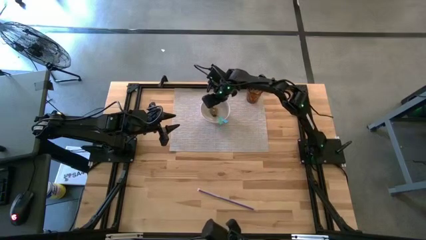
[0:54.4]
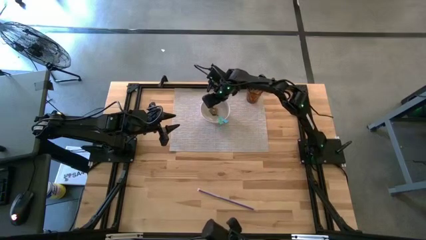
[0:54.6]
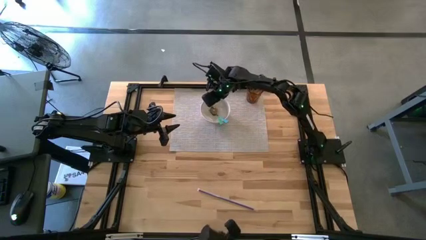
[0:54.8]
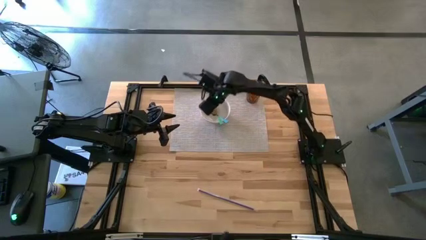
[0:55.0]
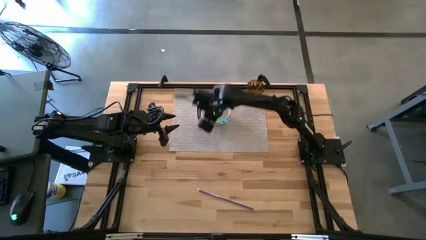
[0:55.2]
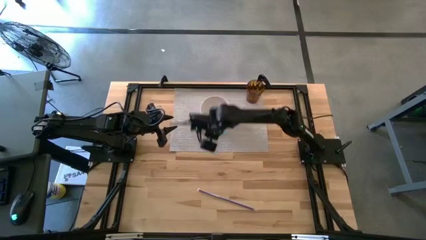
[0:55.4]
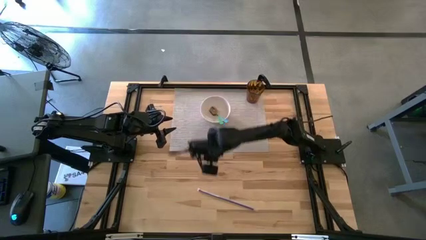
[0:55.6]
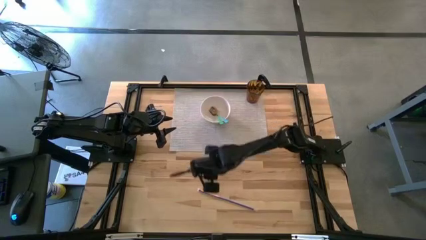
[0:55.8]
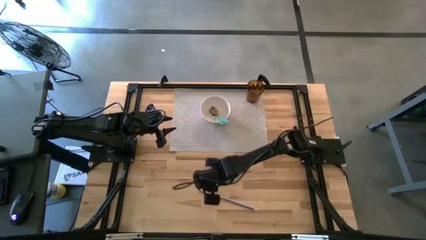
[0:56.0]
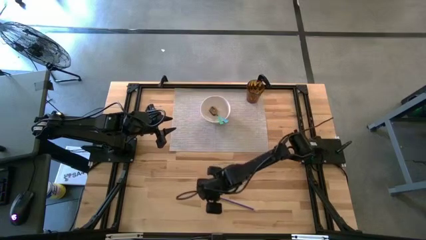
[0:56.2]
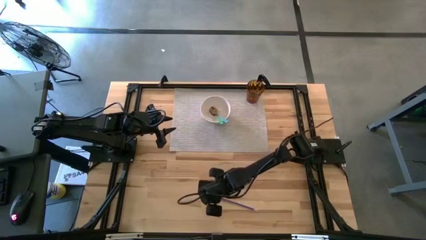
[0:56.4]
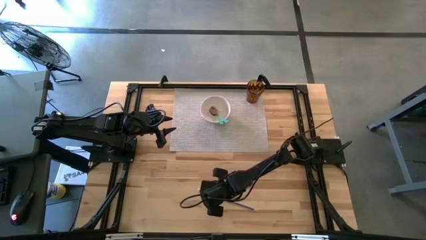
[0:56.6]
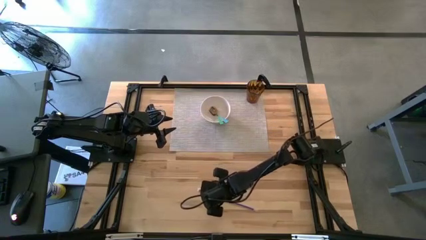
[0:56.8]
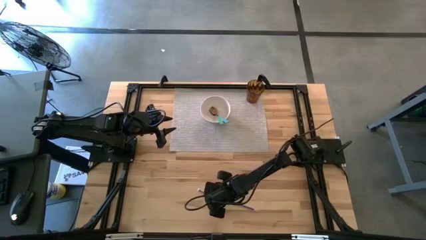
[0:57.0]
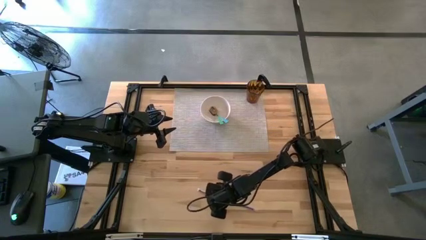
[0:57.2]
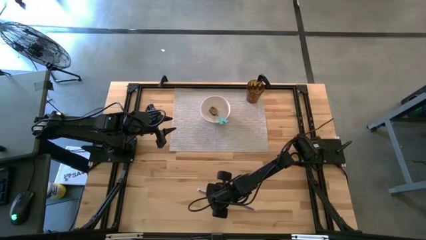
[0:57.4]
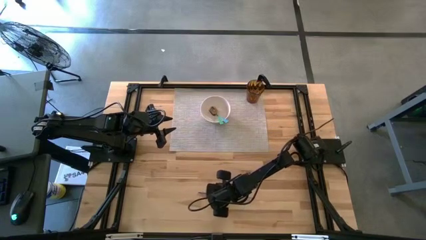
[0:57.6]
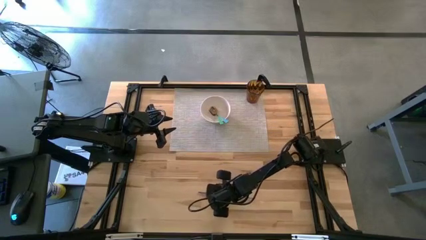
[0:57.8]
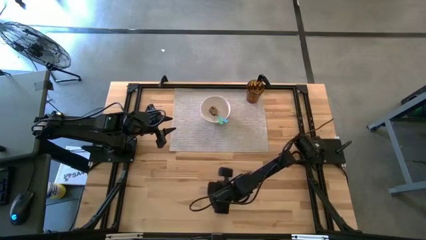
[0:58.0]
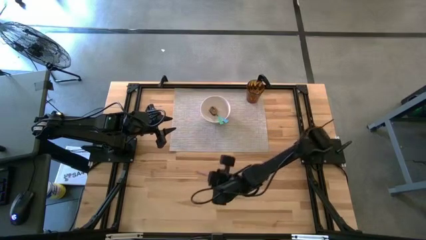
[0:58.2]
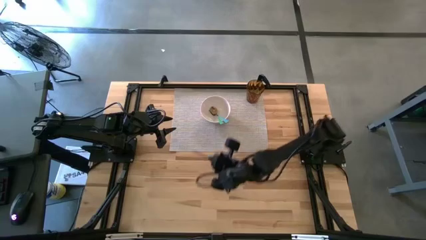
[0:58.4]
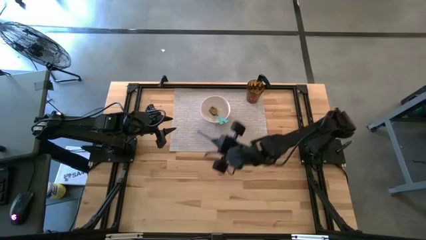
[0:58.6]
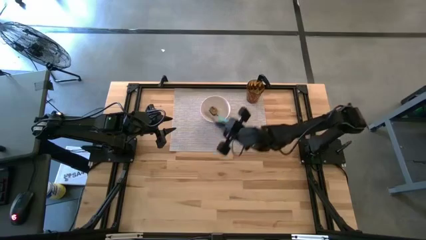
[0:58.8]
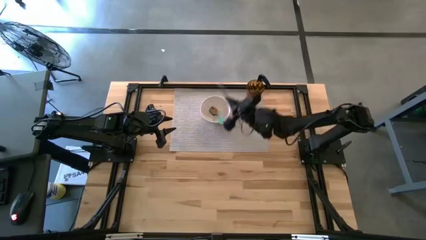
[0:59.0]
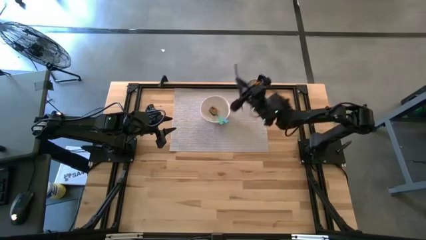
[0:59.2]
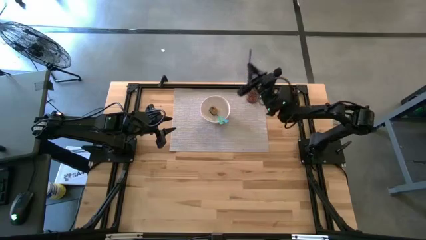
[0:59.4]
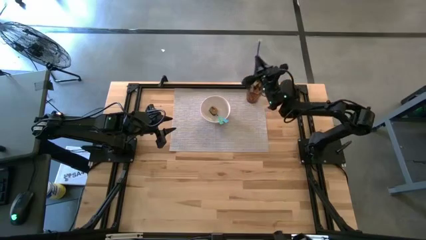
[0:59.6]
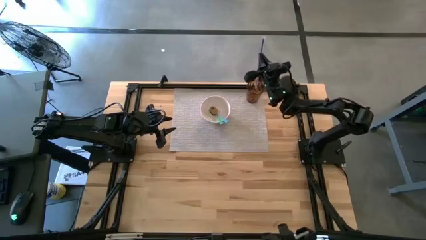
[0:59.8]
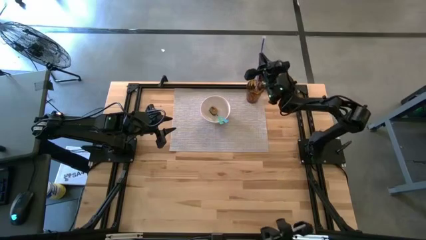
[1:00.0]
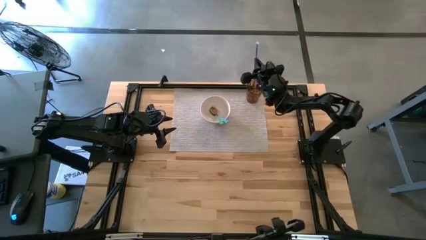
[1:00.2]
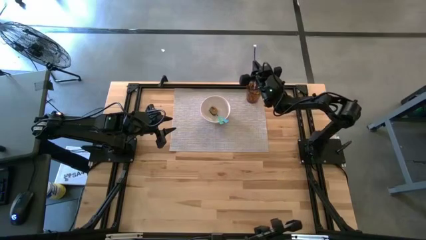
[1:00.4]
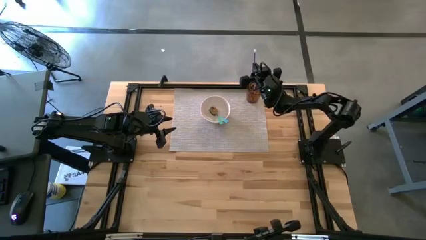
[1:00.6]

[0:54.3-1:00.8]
Task: Pick & Place Utensil
Put the violet straw into the brown cup

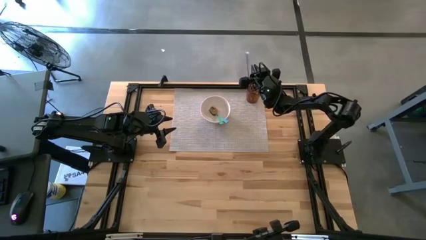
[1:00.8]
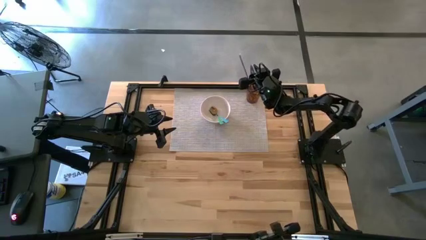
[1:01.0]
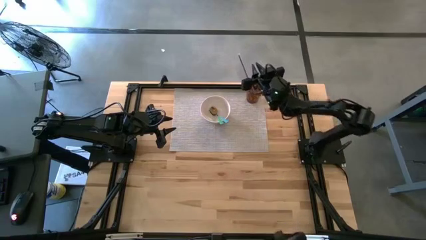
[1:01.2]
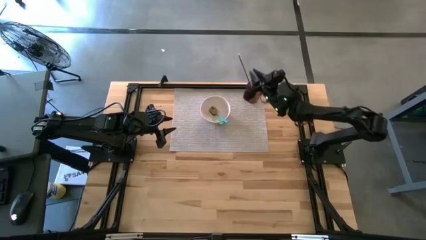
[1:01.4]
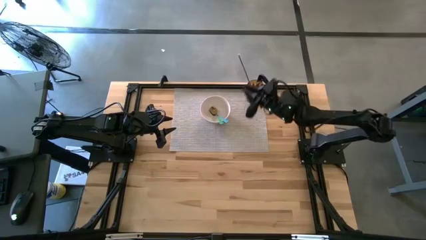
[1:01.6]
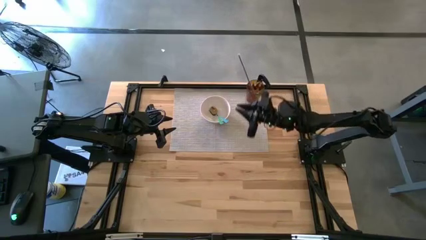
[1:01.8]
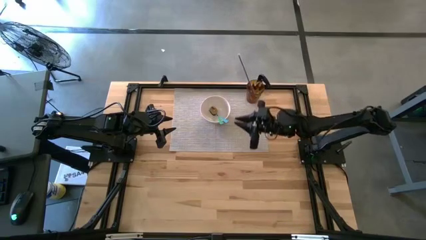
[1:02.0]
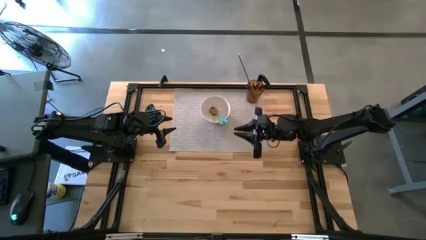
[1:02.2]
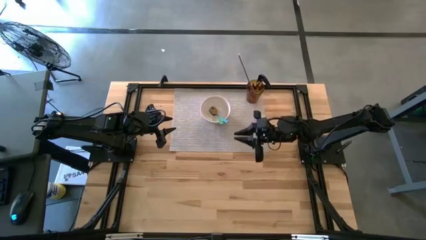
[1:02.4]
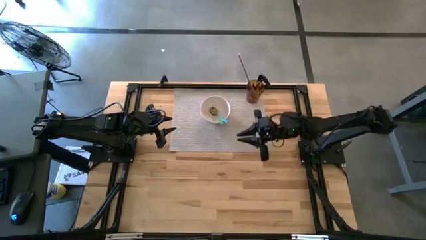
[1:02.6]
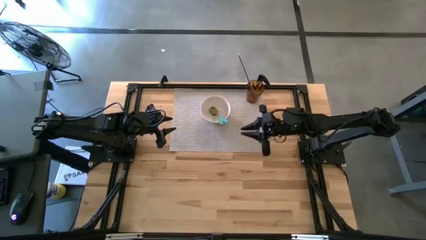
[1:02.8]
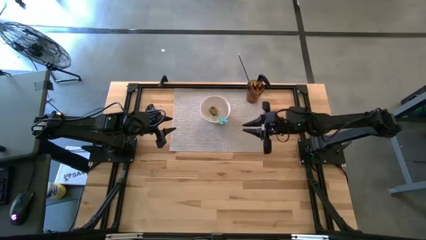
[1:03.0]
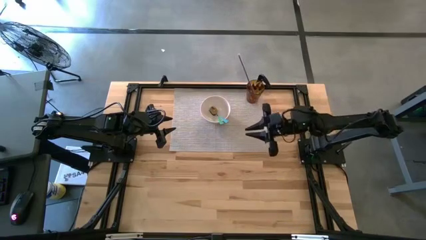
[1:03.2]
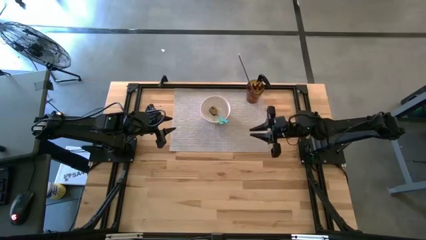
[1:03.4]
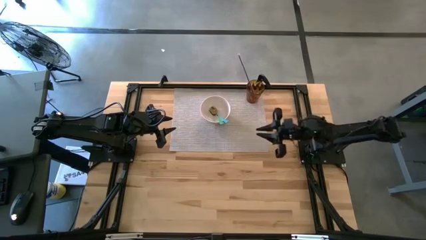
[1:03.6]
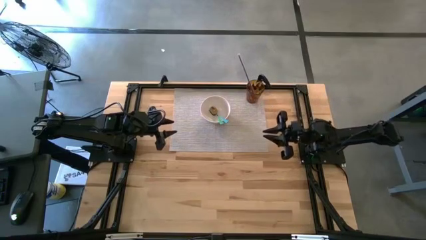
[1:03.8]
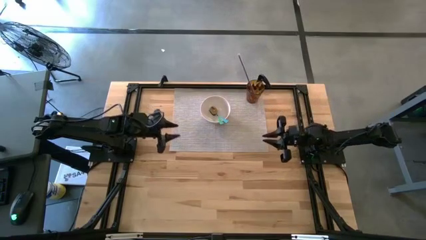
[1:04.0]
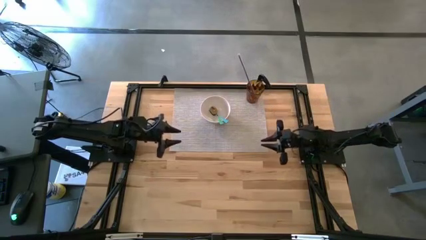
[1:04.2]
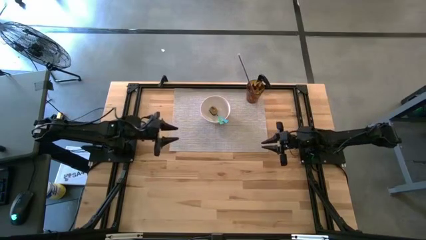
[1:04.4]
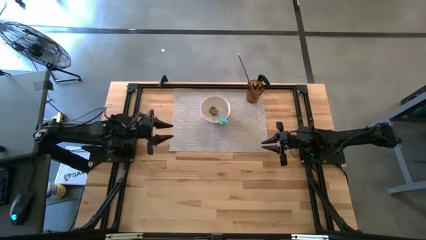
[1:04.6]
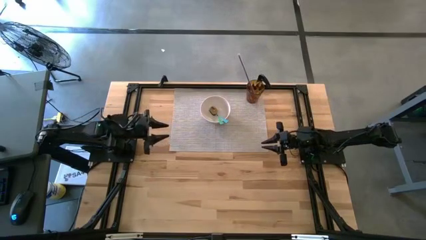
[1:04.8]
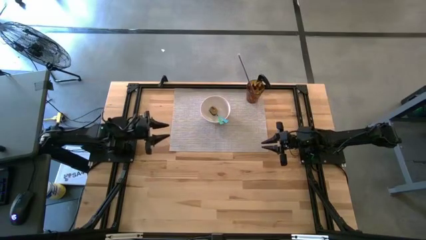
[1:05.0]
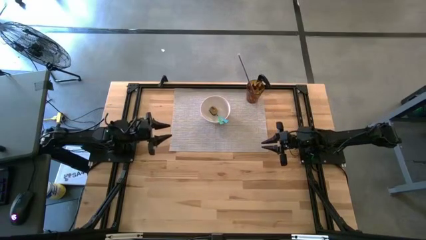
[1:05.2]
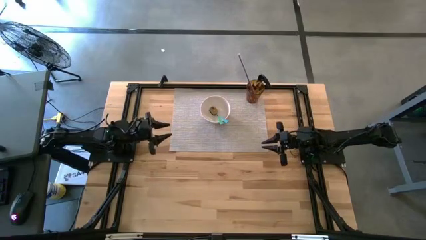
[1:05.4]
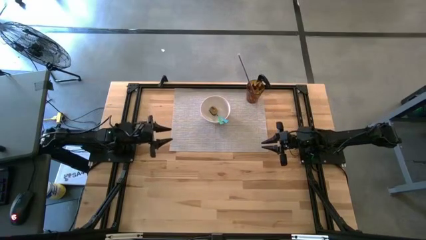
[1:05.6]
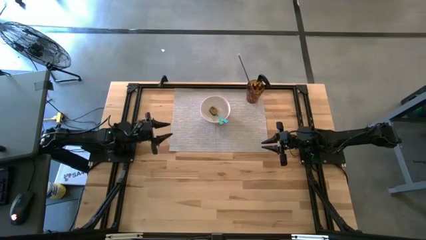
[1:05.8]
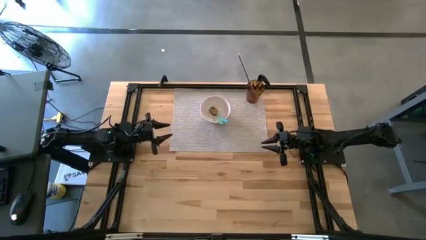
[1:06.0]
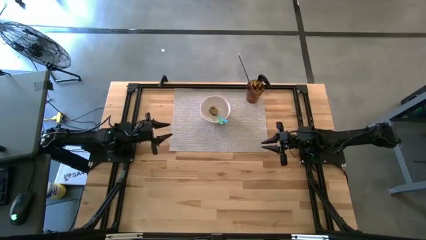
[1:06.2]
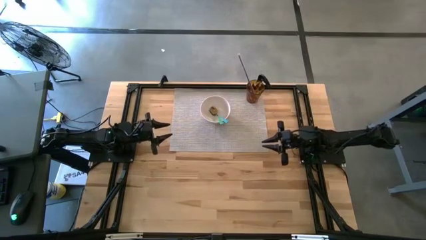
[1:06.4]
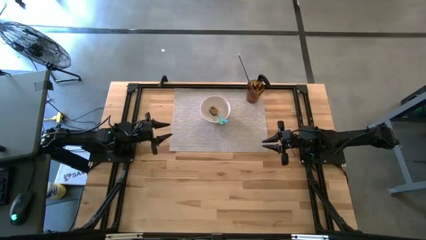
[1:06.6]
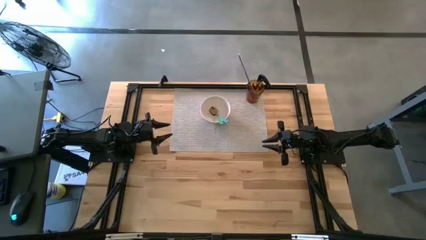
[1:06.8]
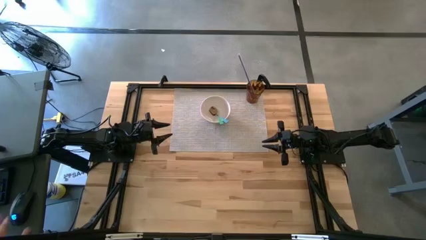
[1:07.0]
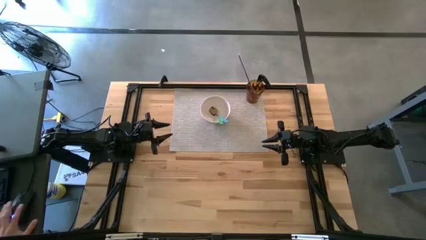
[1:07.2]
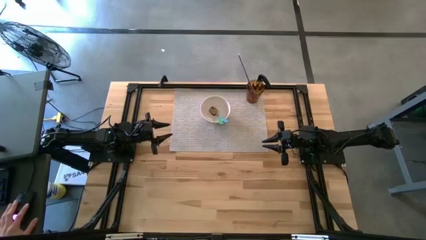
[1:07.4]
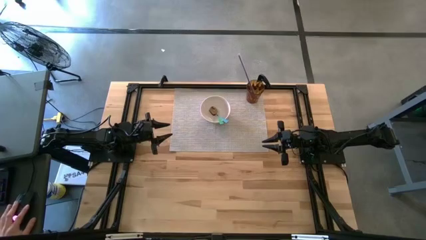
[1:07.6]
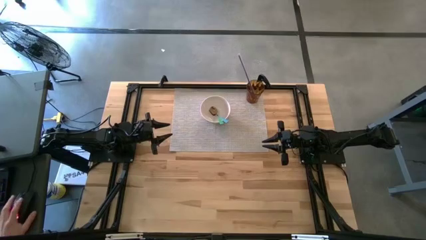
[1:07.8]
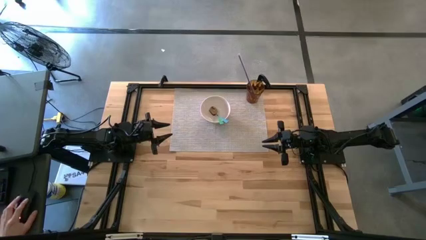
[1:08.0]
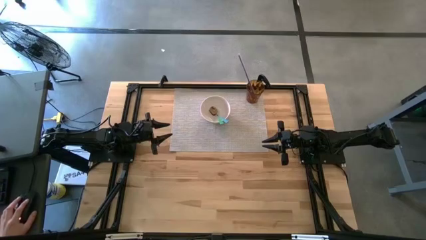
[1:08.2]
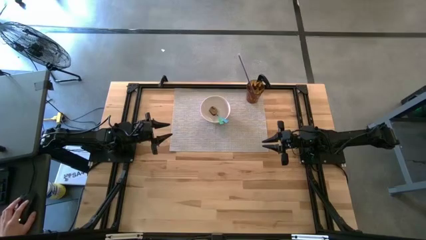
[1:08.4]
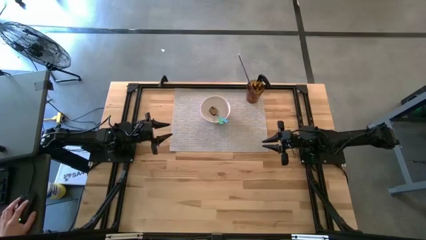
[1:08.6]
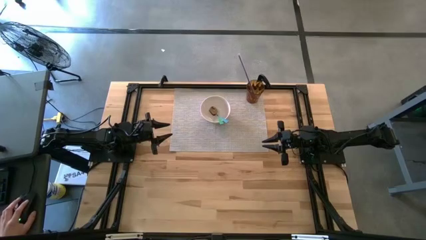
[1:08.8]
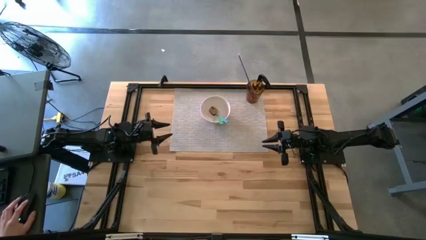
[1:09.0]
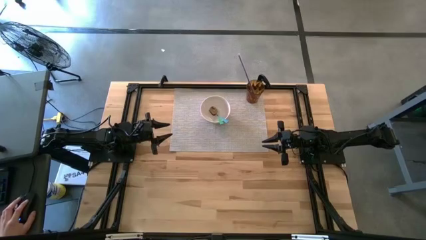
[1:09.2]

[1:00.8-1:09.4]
Return to Home Position

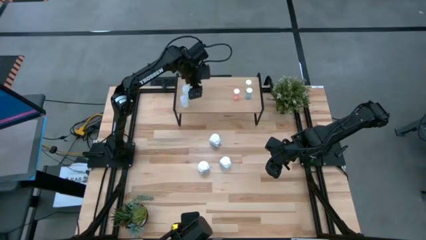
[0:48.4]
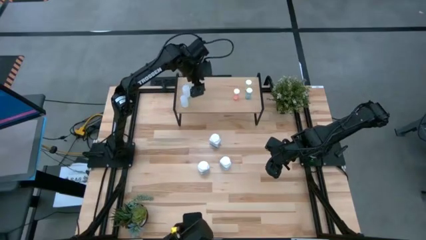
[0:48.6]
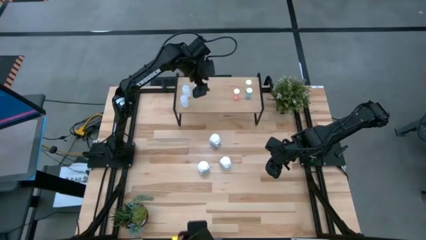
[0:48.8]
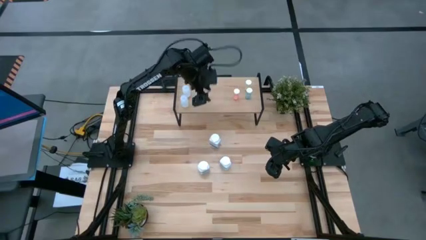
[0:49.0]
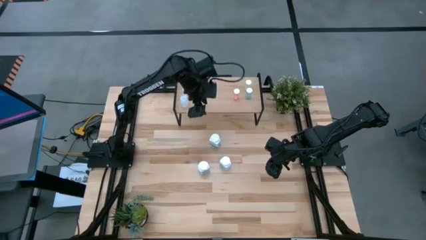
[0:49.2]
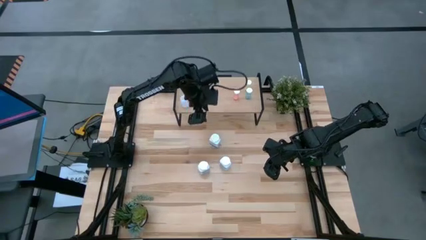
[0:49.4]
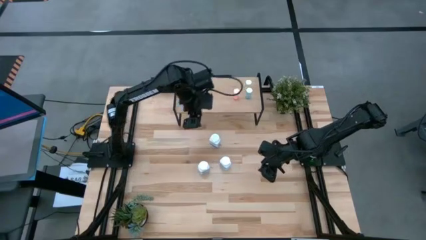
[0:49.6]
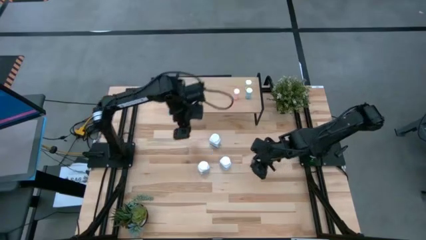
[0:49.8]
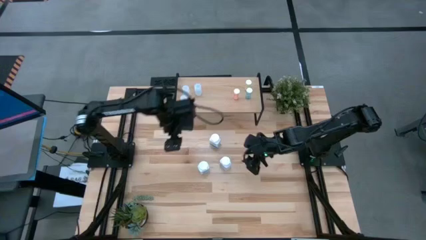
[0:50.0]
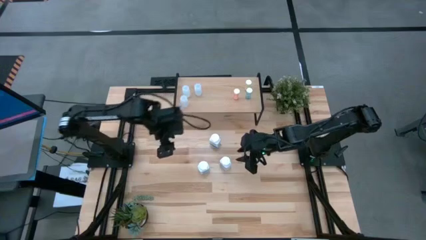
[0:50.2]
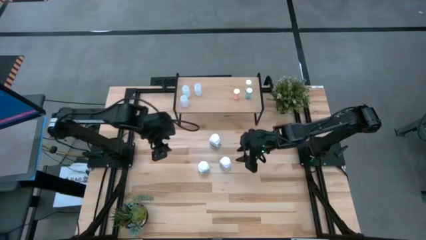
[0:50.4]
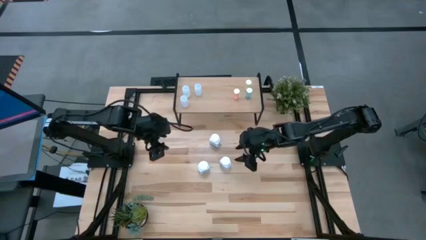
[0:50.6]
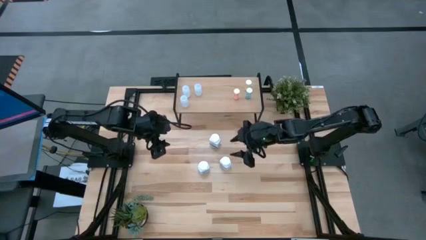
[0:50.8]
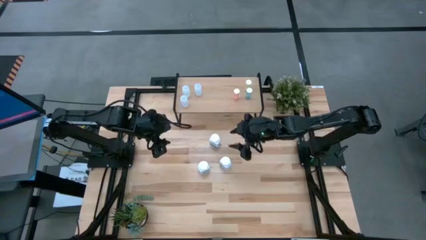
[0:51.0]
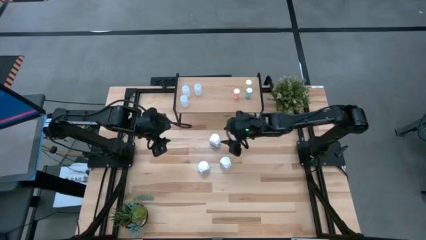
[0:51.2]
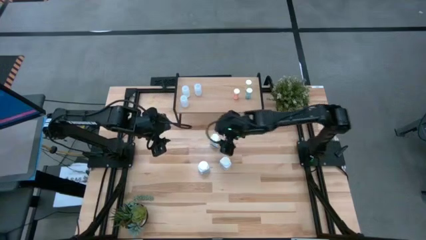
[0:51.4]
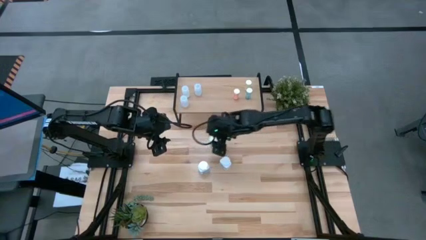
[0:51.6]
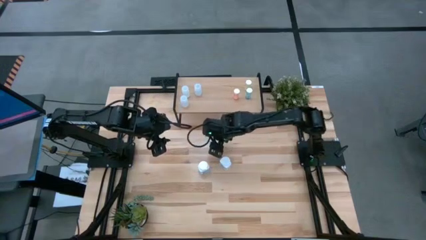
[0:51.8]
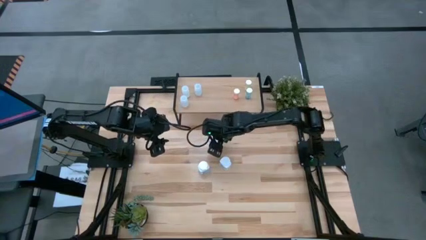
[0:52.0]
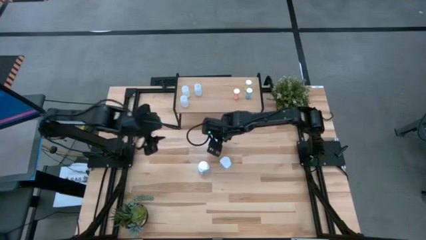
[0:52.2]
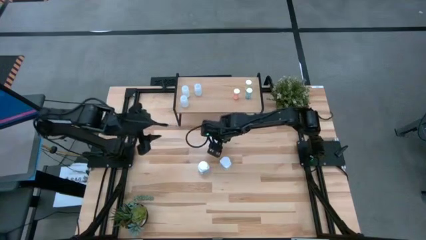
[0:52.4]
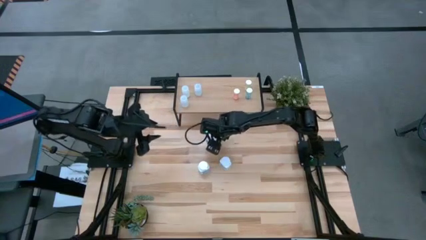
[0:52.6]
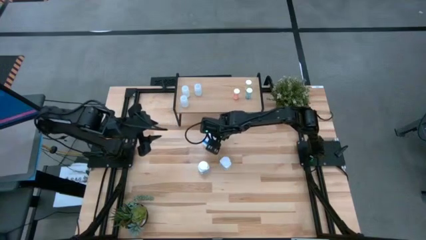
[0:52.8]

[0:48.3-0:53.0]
Task: Pick and place medicine bottles onto shelf by color
Put the top right white medicine bottle on the shelf
